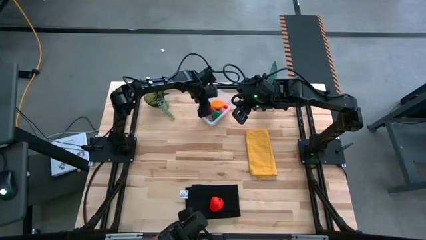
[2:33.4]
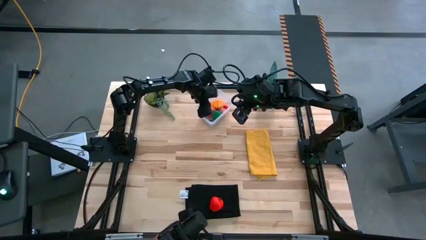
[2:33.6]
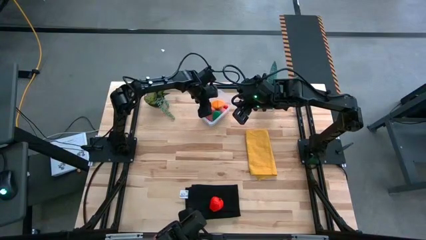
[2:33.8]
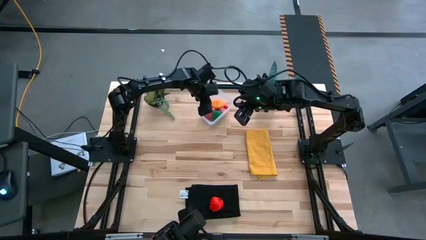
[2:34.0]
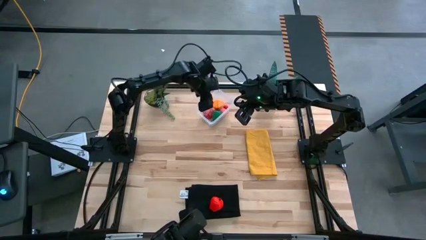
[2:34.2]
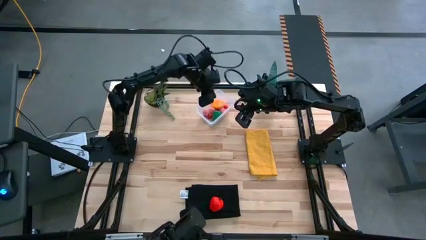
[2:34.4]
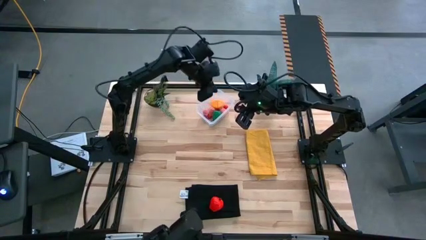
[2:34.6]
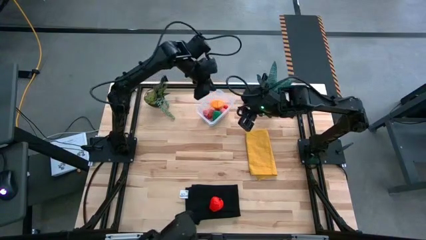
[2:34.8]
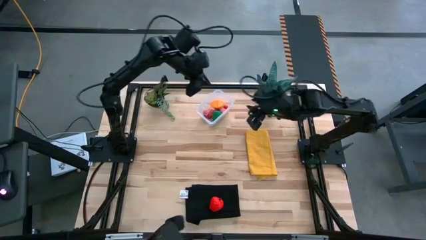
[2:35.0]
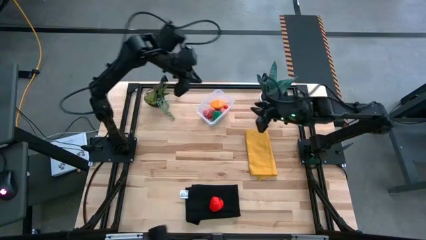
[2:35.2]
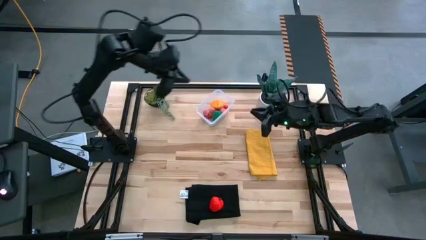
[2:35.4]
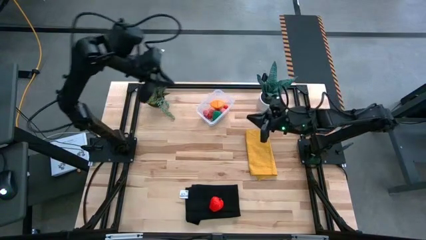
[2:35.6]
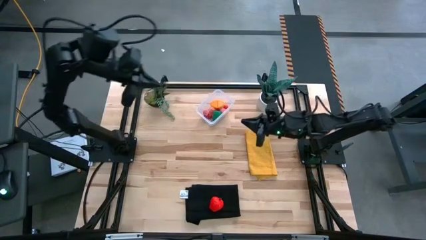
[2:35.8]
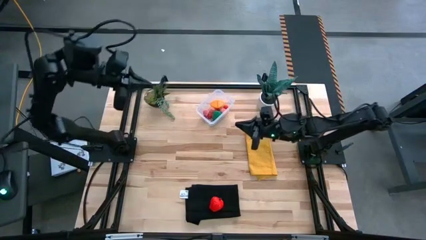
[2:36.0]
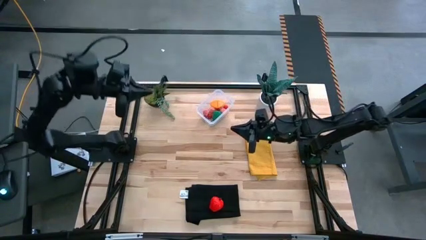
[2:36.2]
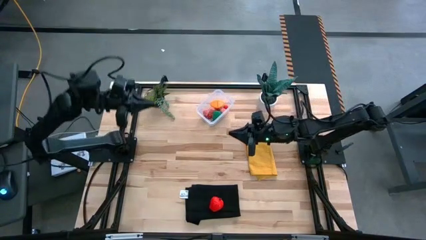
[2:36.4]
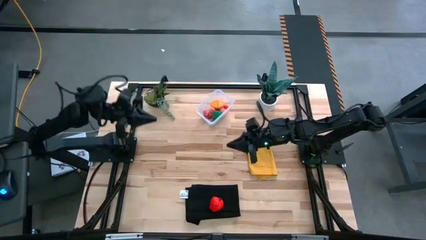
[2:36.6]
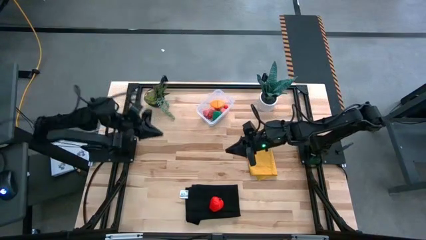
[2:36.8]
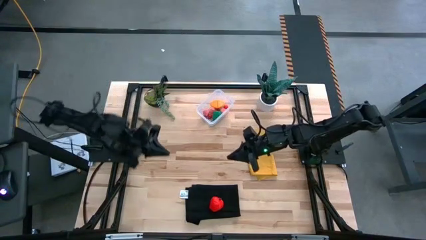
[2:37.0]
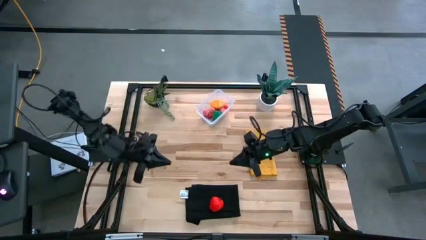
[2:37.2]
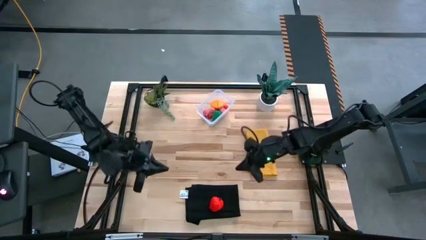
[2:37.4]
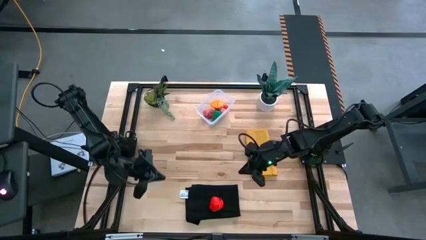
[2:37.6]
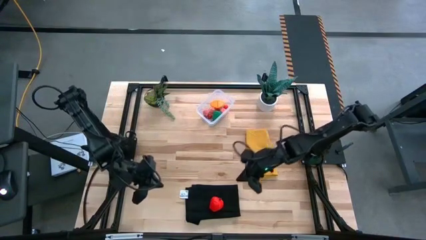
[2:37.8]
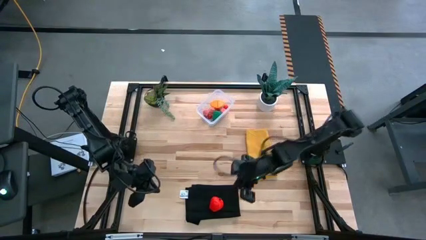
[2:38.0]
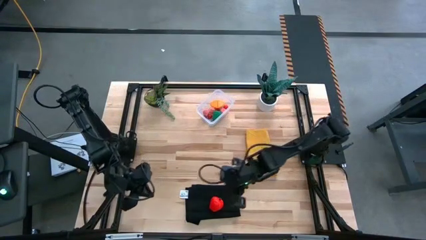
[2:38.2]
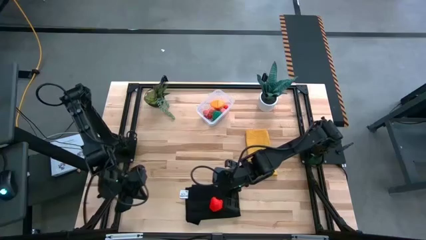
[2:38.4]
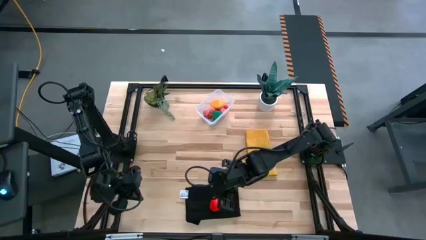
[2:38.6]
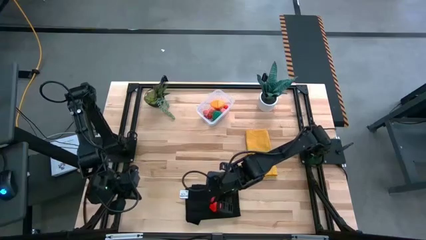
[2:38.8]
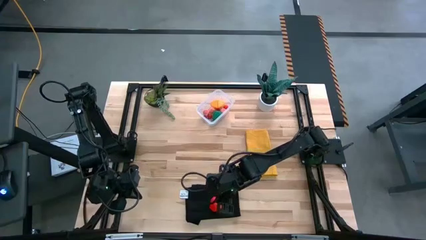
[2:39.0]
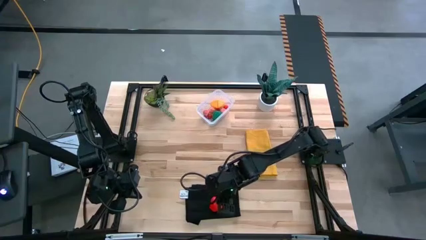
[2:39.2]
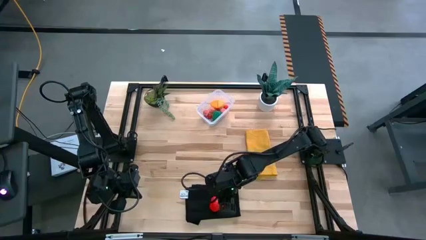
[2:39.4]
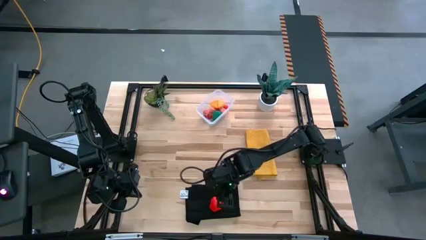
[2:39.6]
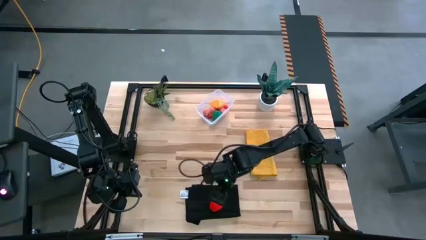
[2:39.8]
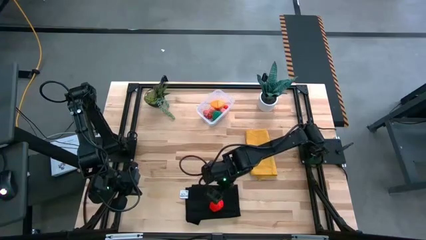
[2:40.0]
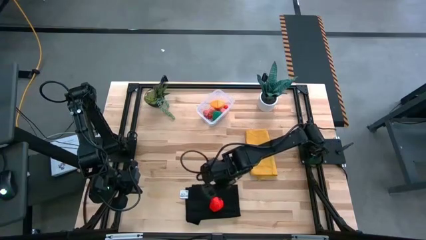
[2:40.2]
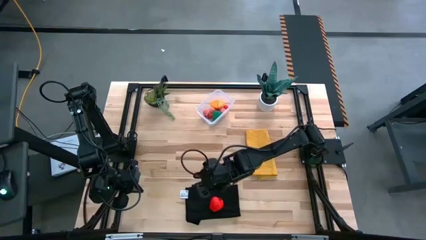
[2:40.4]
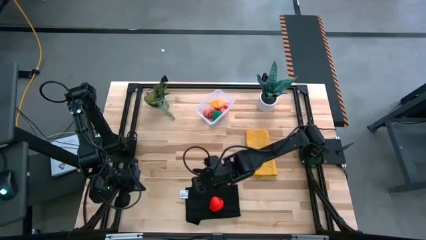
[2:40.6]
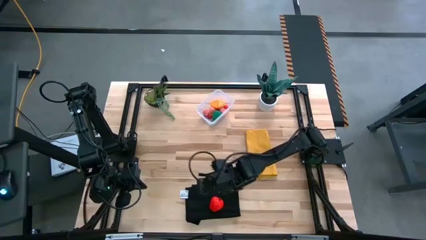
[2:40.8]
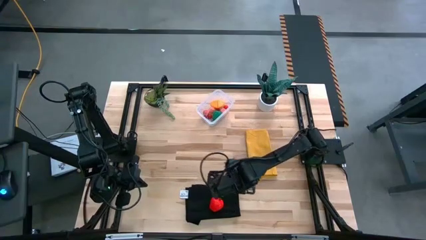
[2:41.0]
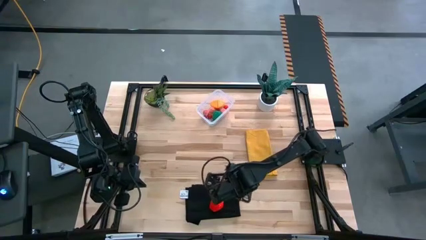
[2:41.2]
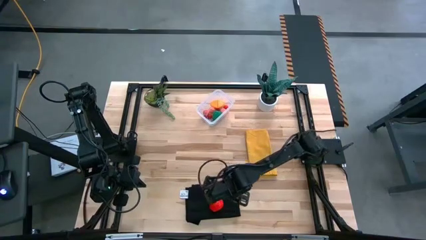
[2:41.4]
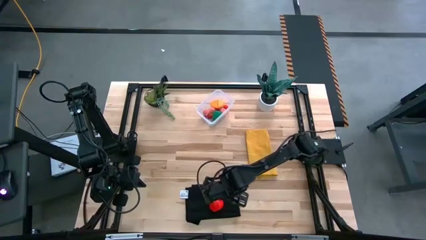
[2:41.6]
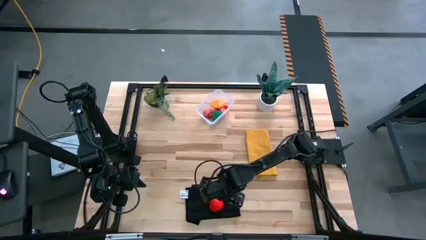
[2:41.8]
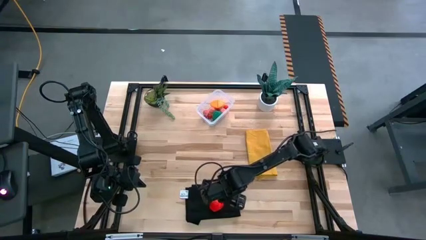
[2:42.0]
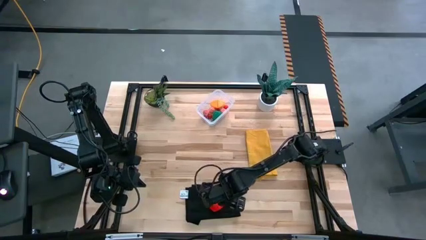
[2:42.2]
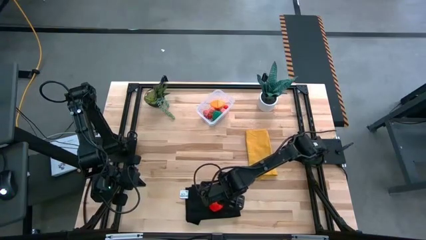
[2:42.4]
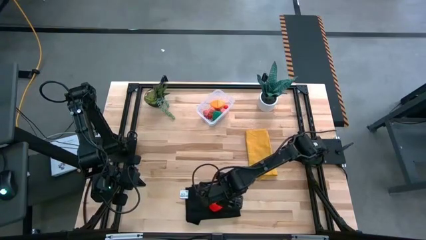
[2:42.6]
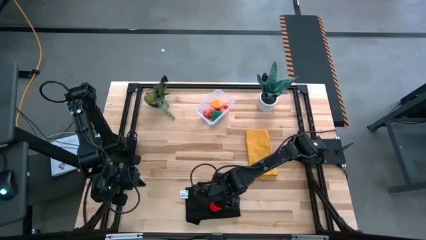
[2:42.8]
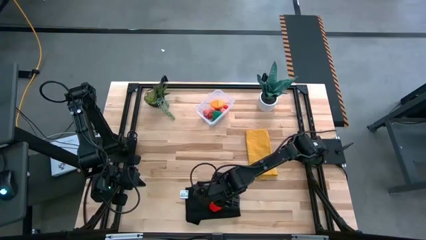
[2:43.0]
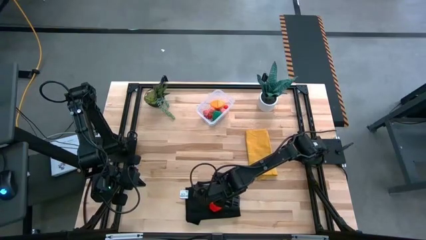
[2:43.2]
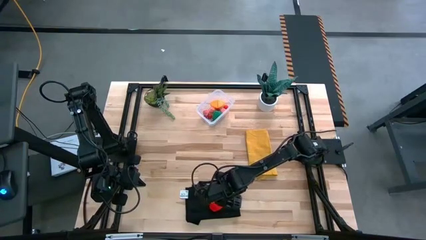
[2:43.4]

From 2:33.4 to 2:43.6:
Task: Pick and placing Produce into tupperware
Put the red apple into the transparent bin
